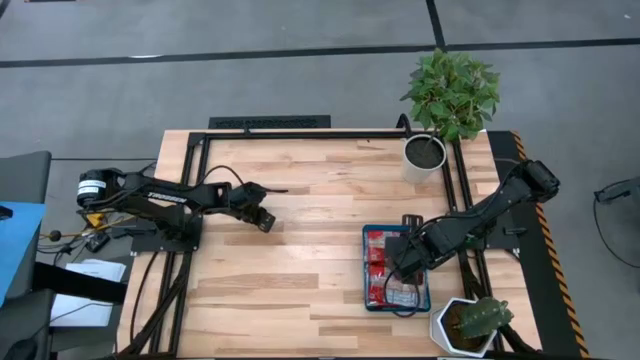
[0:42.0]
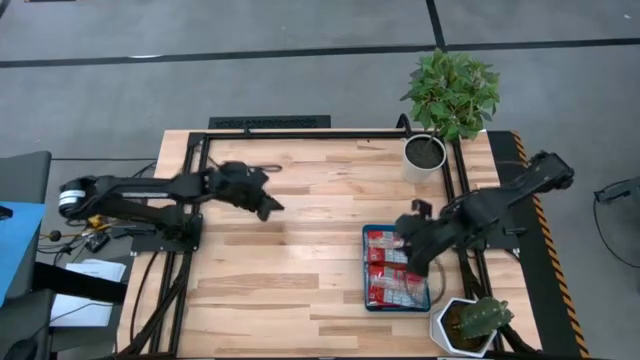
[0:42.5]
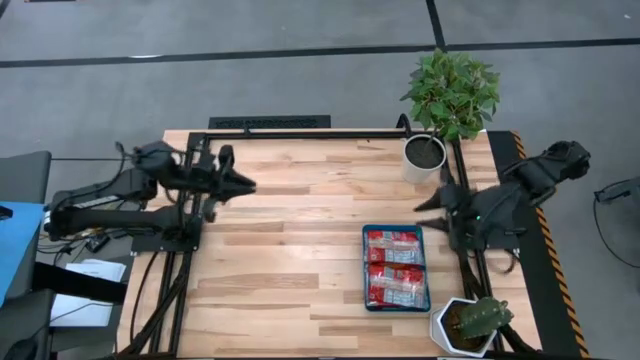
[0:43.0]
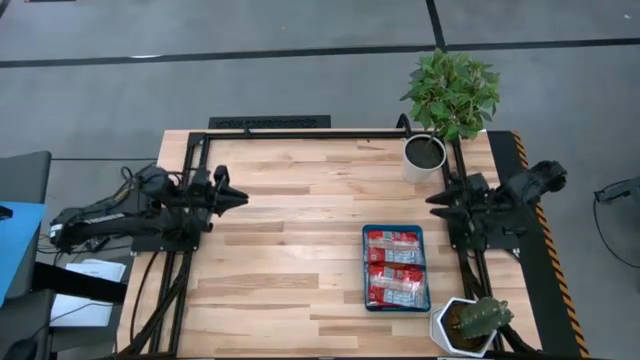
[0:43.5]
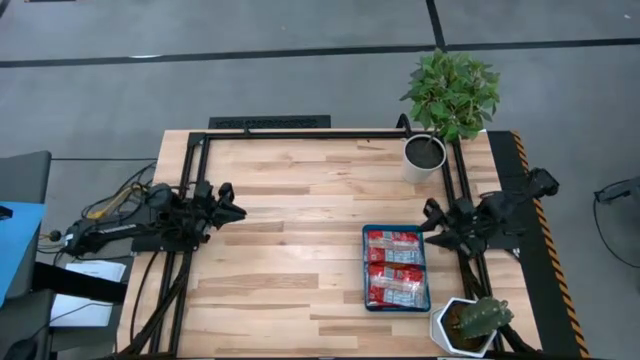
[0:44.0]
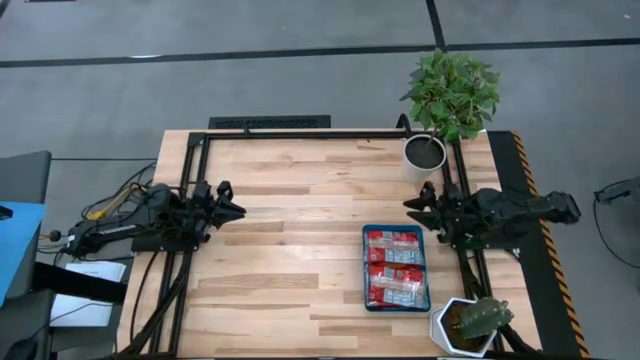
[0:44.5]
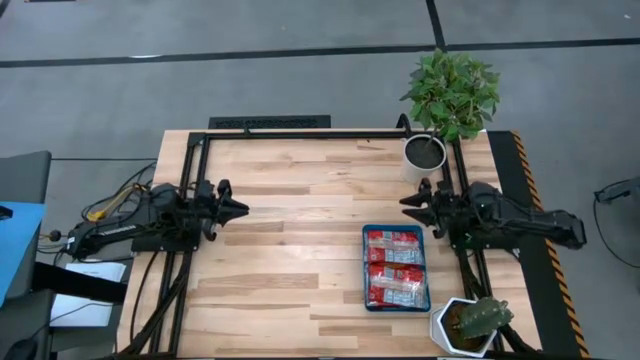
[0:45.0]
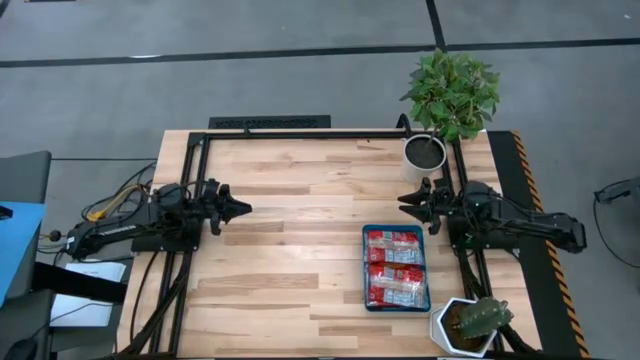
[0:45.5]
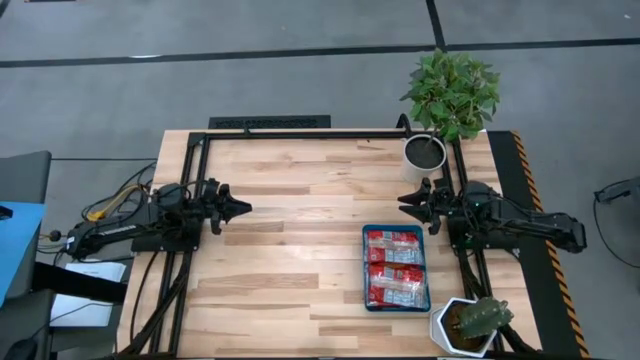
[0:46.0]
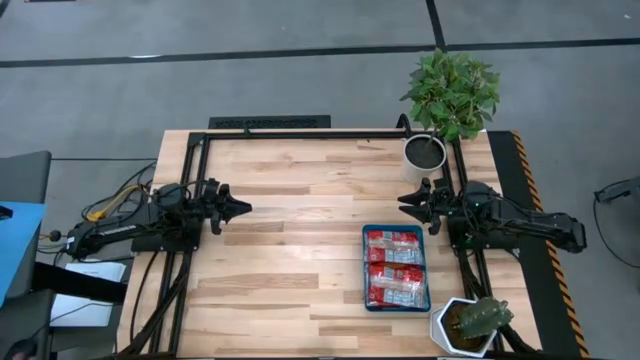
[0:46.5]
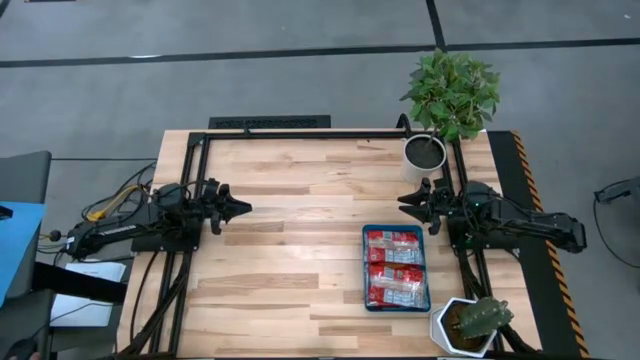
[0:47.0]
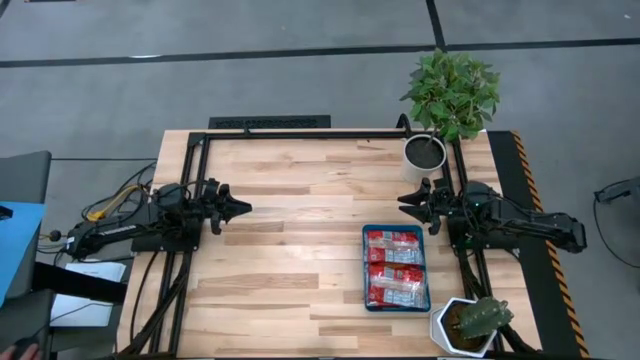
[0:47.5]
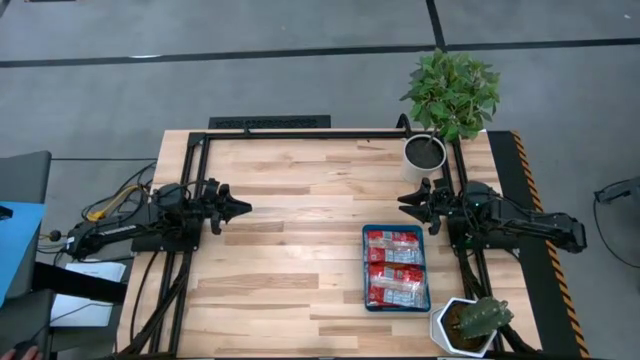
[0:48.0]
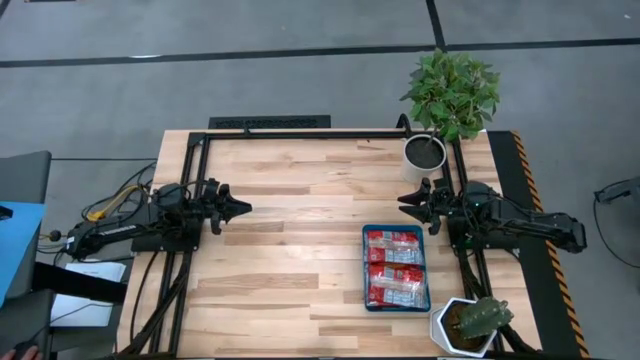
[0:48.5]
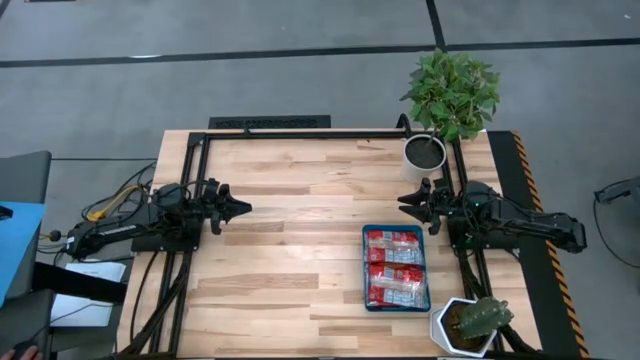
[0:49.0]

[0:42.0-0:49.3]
Task: Sort popcorn bags into baskets
Return to Home Position

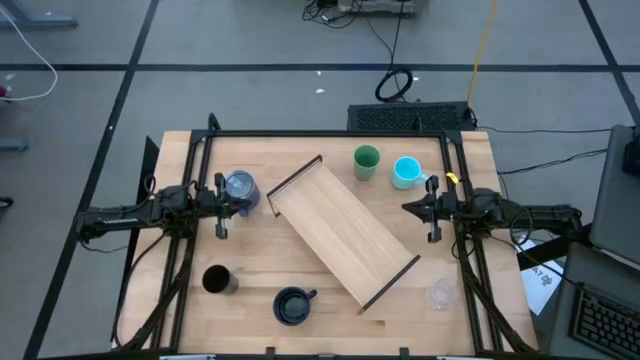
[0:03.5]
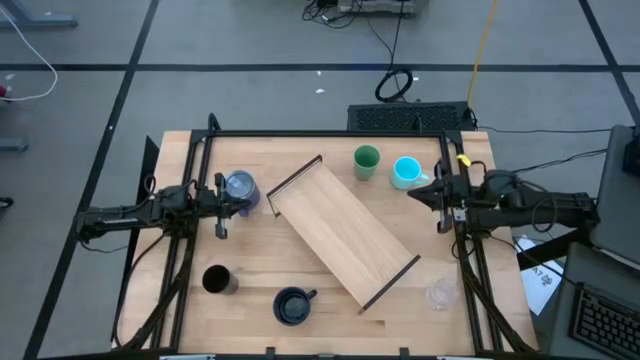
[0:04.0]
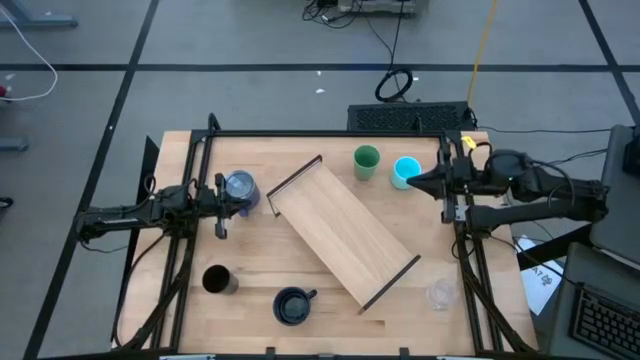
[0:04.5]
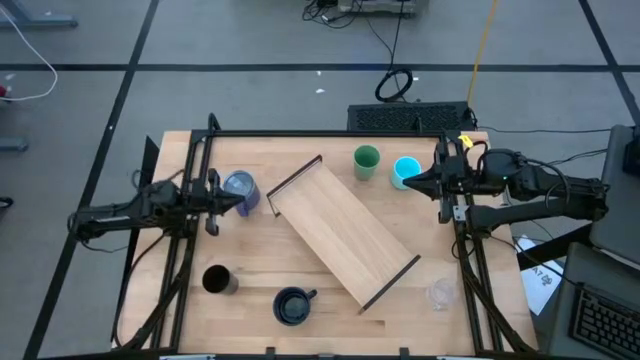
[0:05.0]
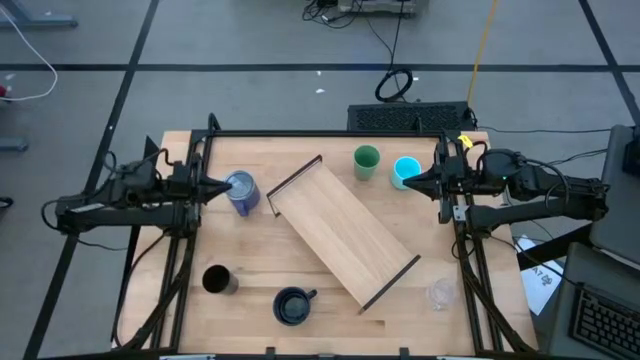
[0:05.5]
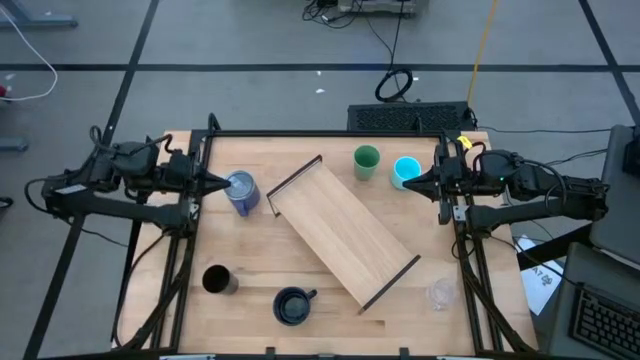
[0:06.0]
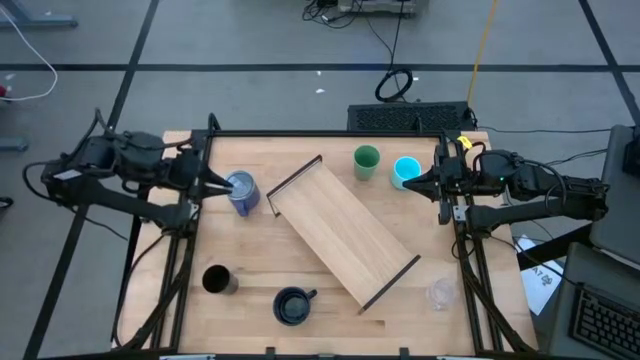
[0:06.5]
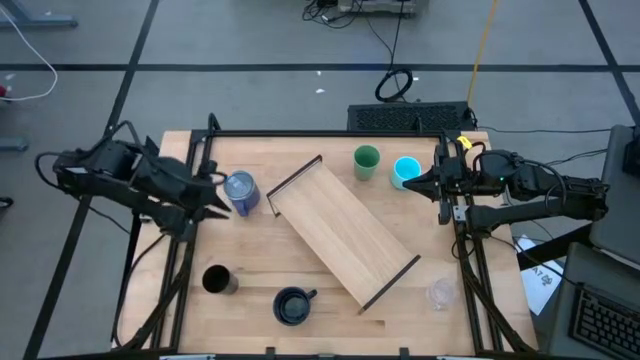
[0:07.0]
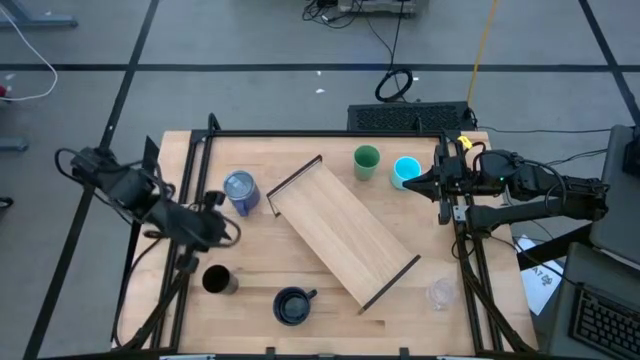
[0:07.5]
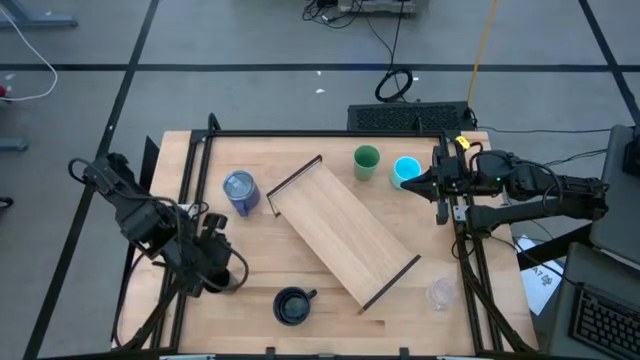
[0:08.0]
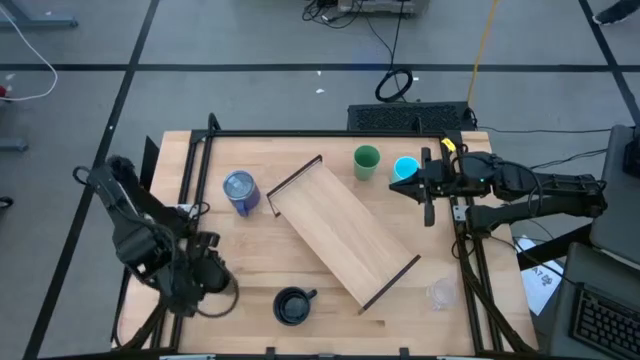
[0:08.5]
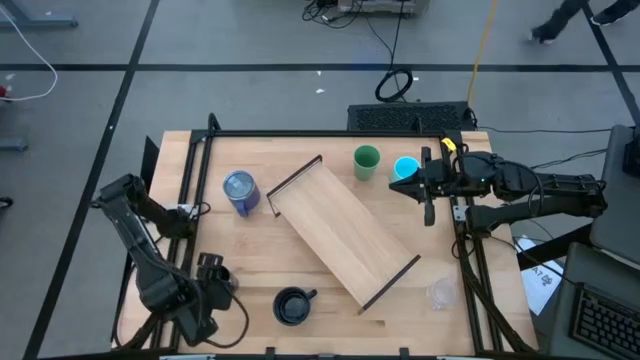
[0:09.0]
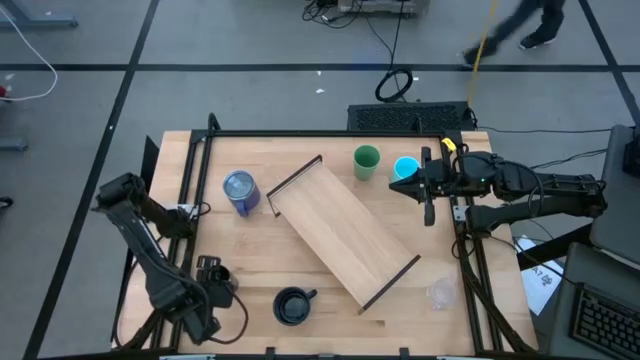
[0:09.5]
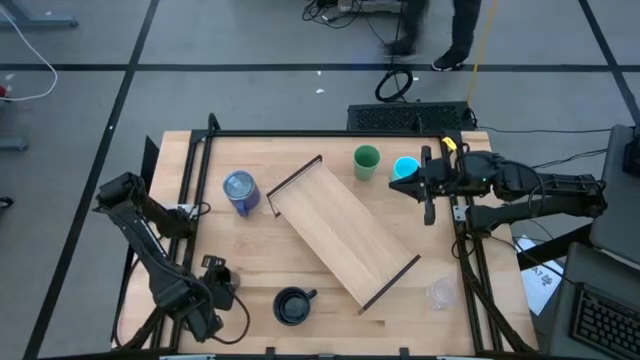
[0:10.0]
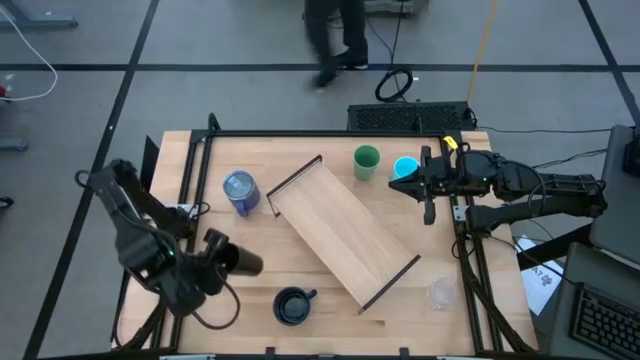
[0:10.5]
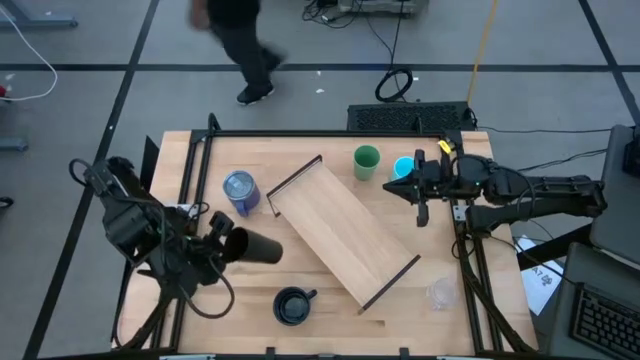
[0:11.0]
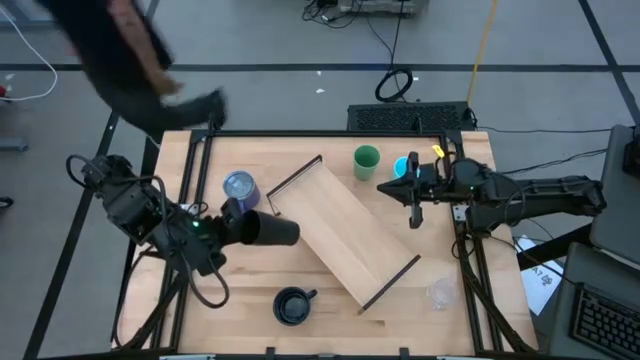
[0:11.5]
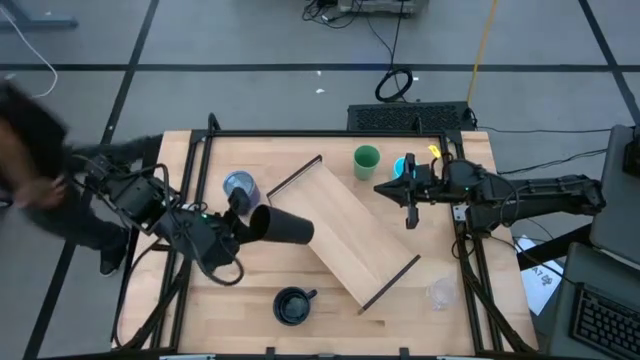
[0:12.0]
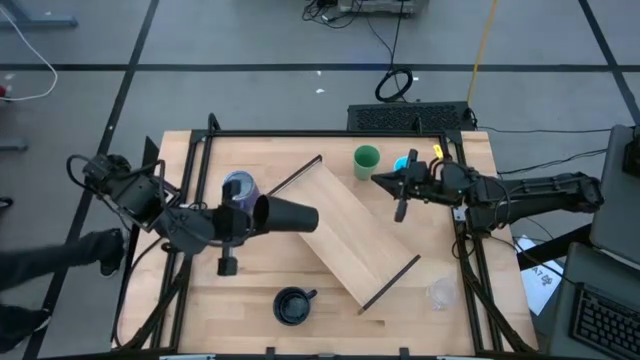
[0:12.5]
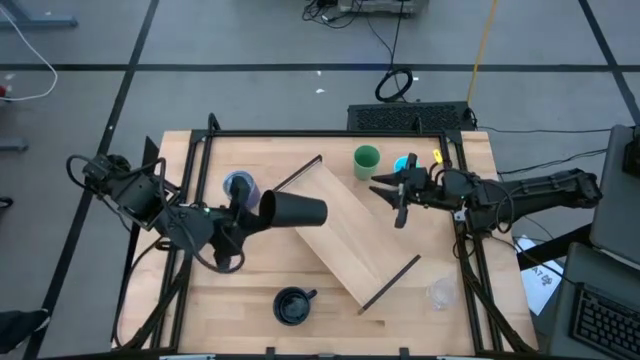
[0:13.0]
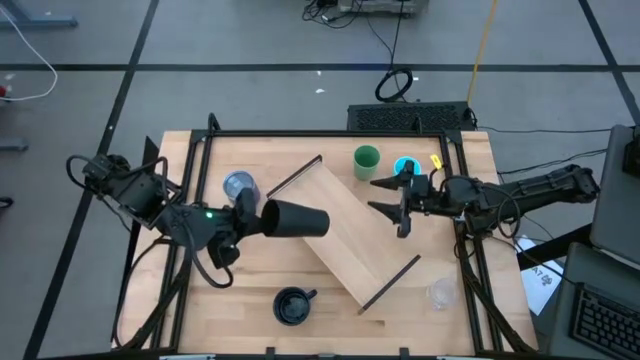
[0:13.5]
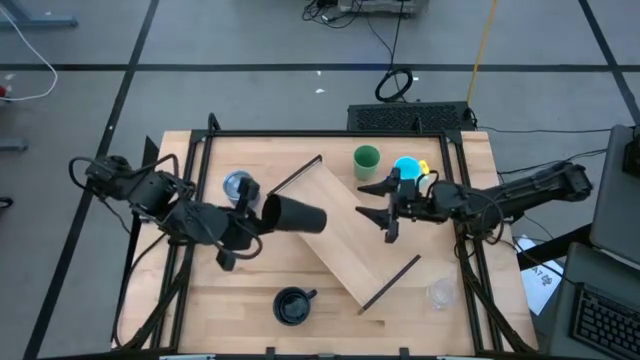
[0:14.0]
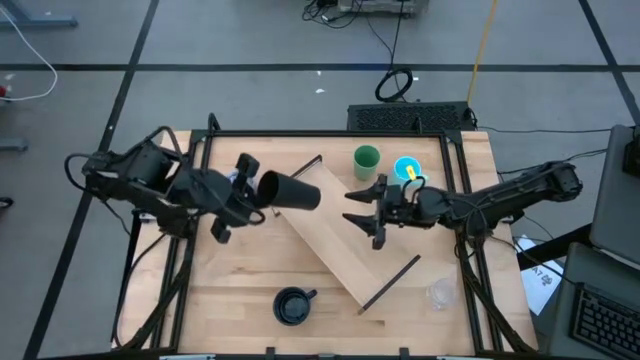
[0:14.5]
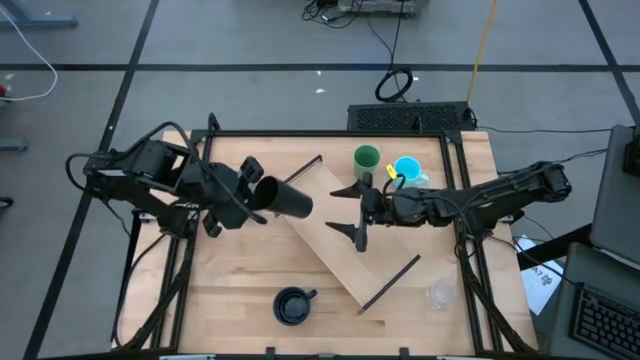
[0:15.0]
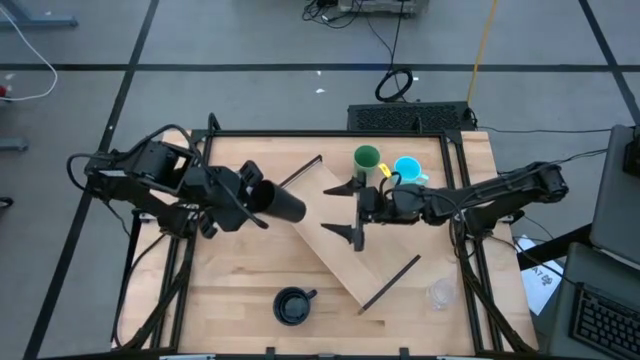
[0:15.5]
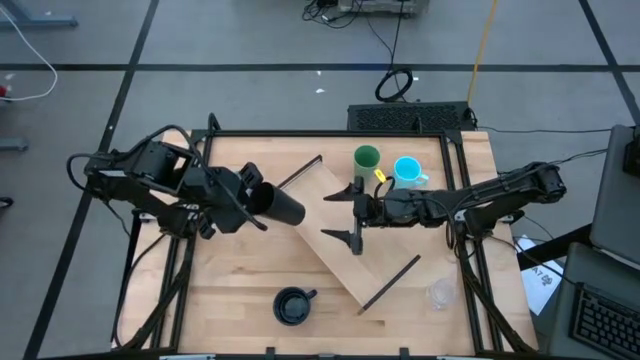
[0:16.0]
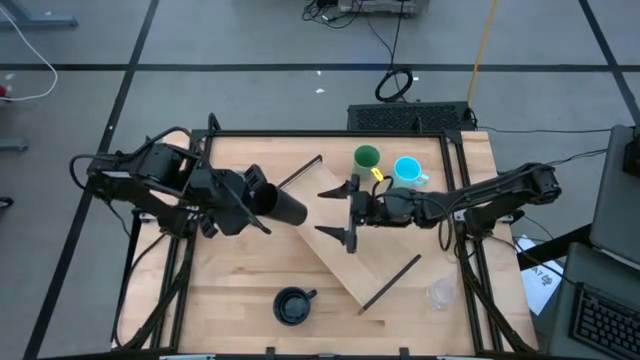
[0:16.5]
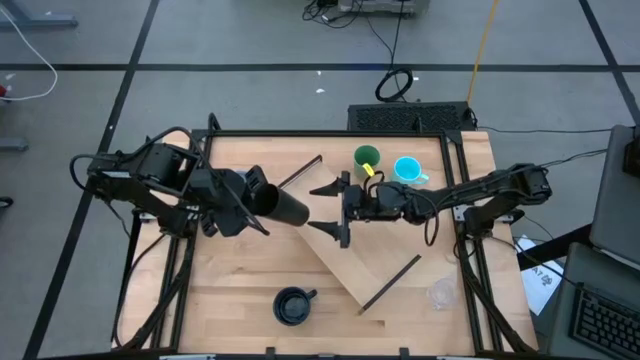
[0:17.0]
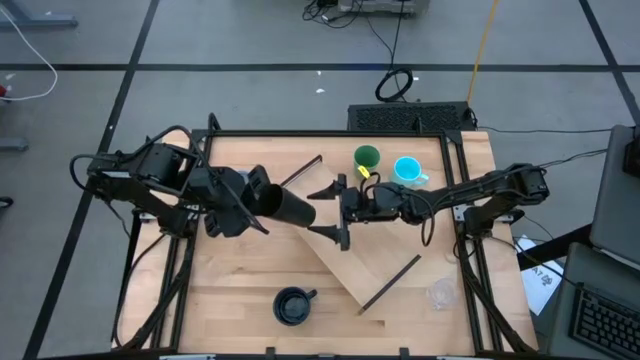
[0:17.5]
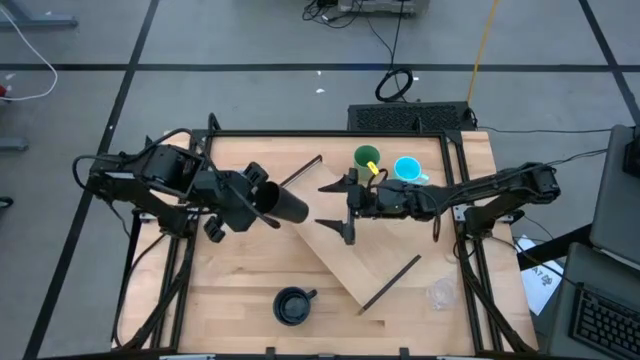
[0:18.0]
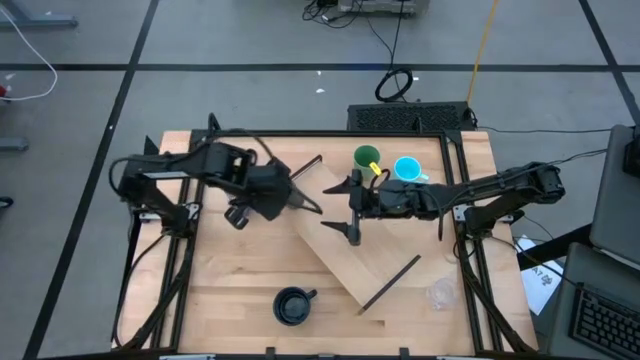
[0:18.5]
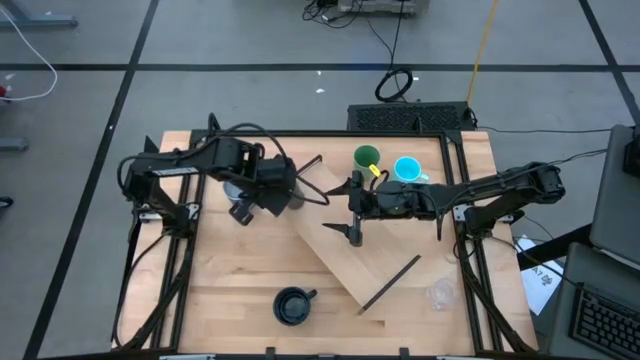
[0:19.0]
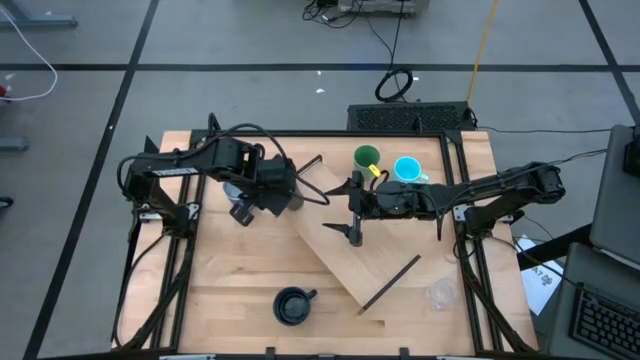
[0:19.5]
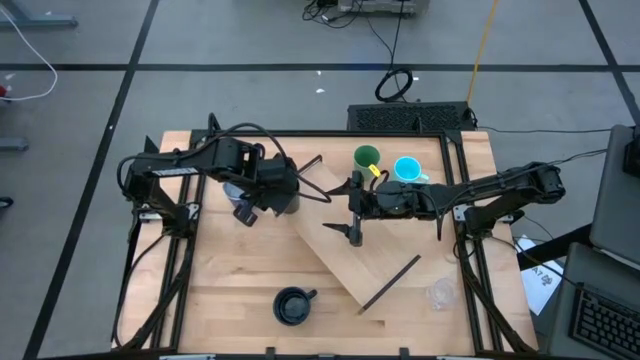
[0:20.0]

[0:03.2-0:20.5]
Task: Stack small to large cups/mugs on shelf
Put the black cup on the shelf
